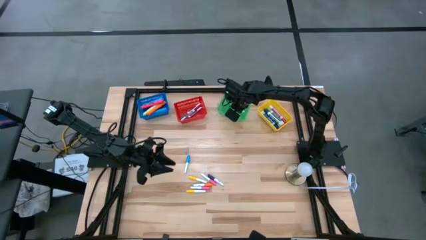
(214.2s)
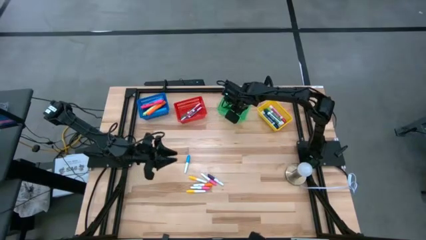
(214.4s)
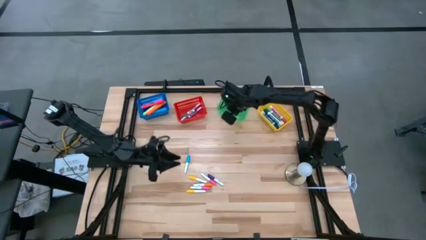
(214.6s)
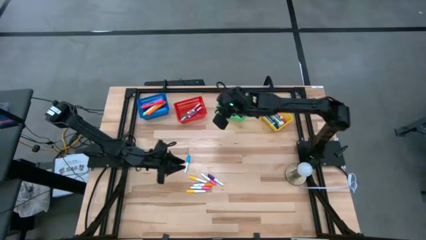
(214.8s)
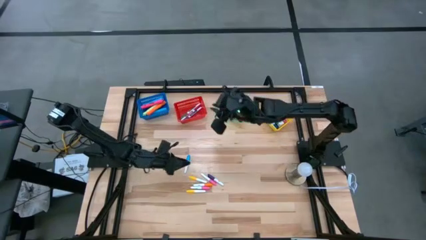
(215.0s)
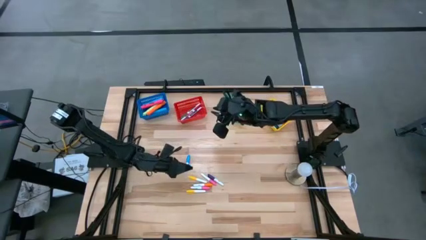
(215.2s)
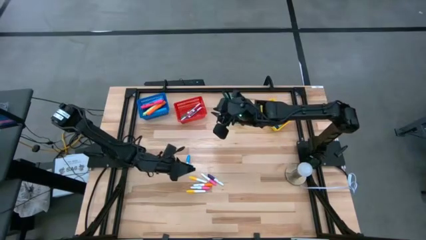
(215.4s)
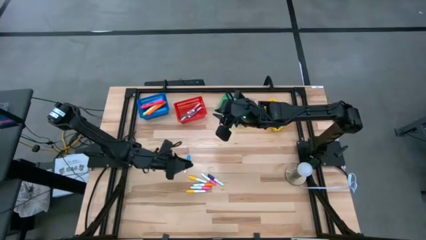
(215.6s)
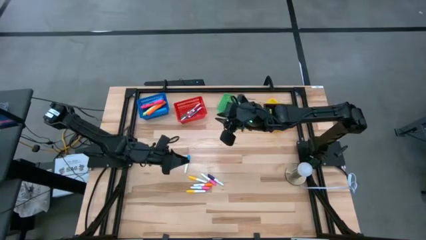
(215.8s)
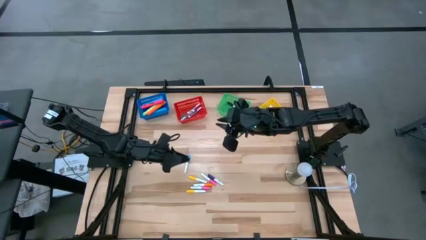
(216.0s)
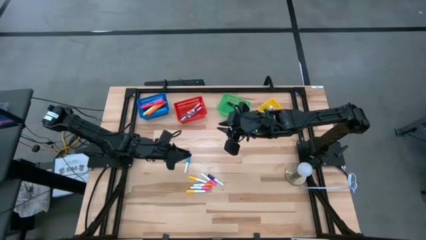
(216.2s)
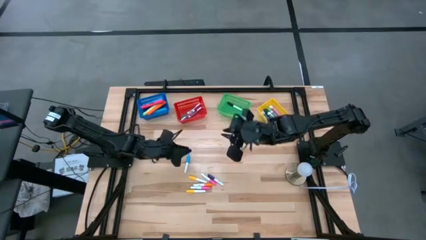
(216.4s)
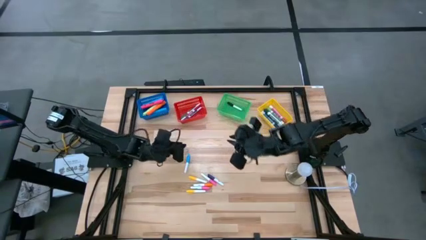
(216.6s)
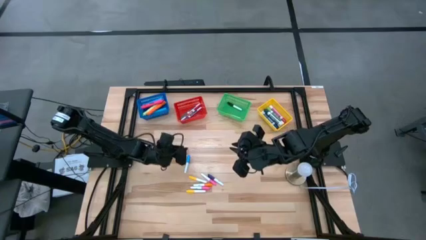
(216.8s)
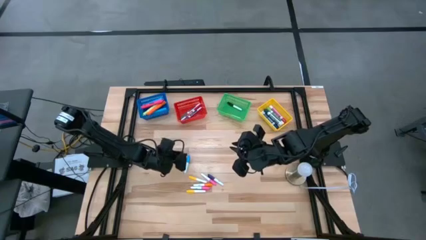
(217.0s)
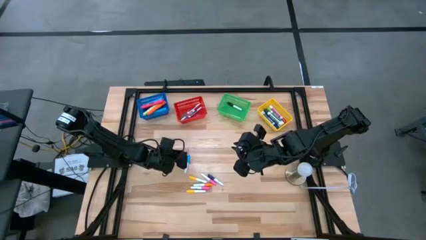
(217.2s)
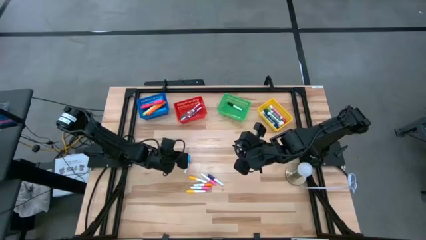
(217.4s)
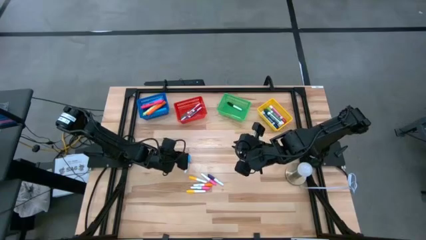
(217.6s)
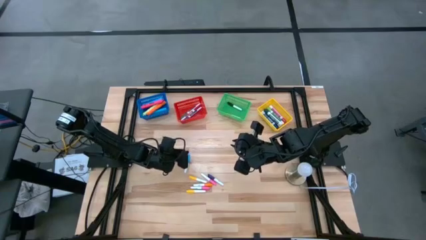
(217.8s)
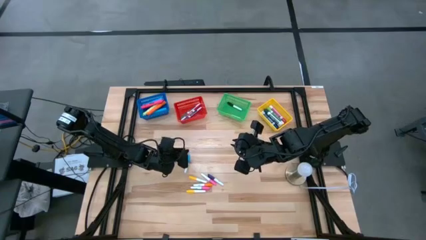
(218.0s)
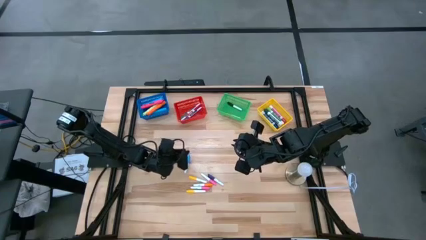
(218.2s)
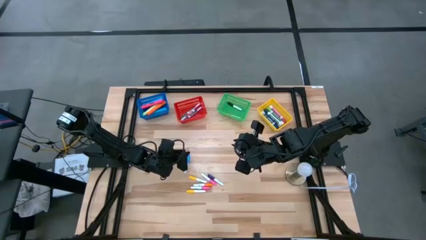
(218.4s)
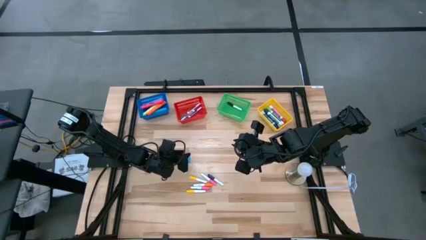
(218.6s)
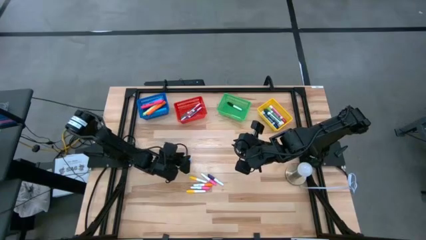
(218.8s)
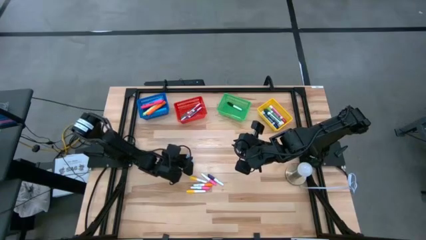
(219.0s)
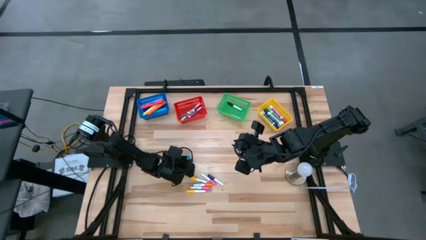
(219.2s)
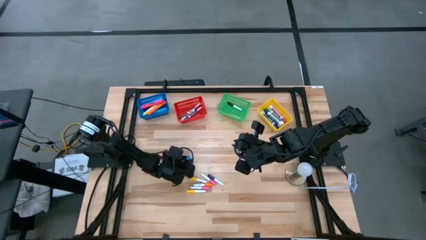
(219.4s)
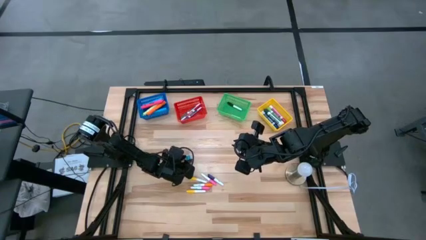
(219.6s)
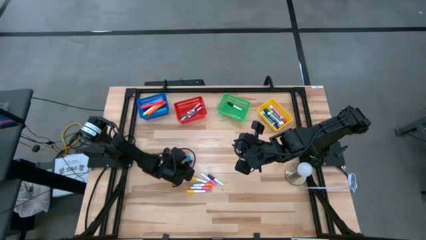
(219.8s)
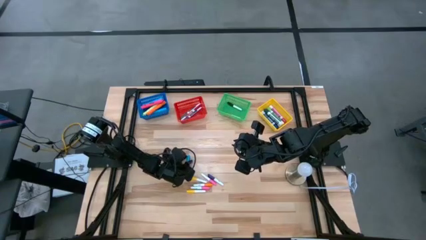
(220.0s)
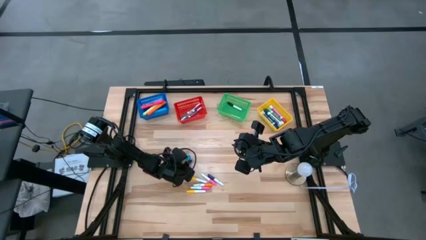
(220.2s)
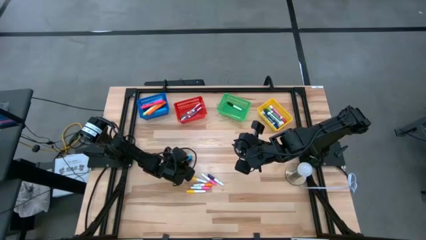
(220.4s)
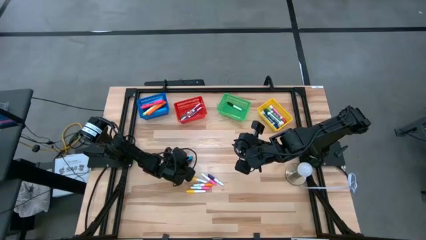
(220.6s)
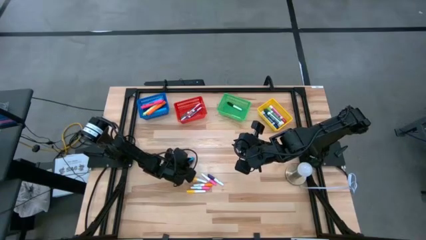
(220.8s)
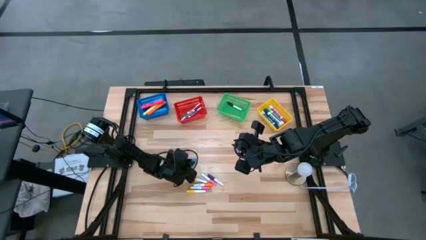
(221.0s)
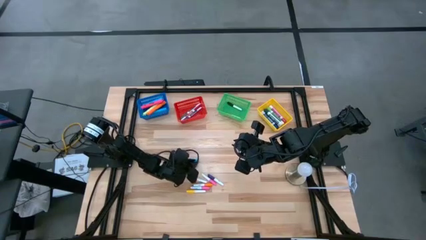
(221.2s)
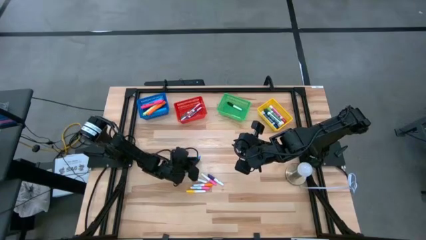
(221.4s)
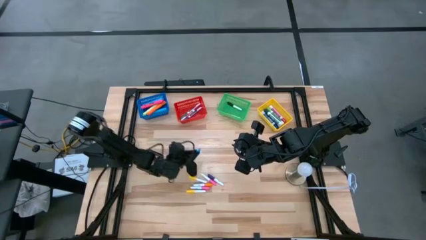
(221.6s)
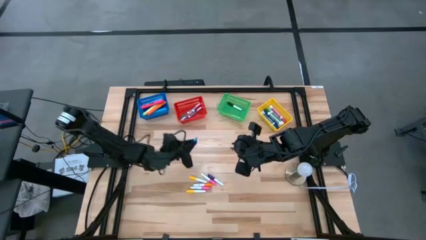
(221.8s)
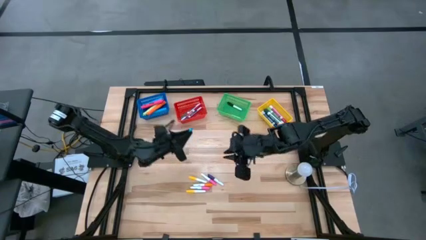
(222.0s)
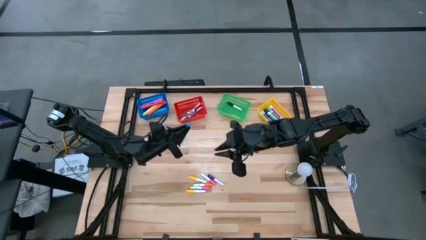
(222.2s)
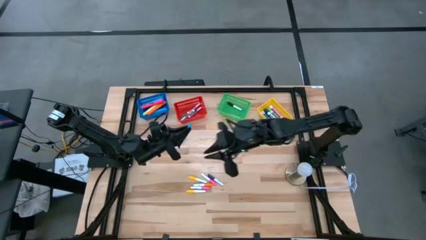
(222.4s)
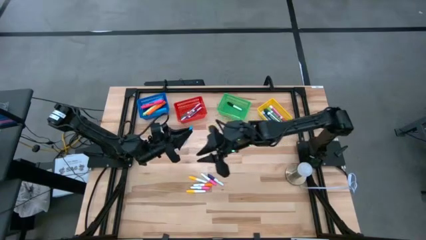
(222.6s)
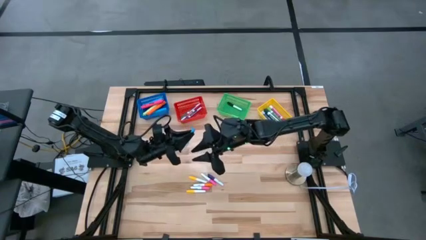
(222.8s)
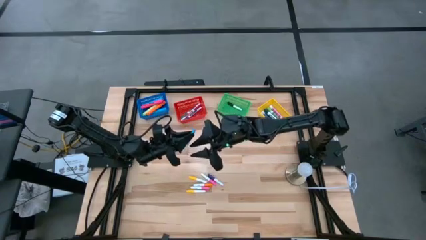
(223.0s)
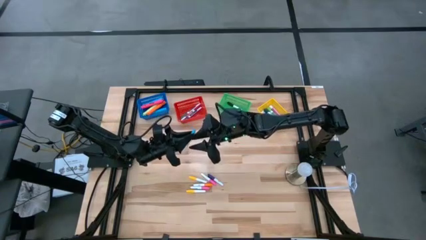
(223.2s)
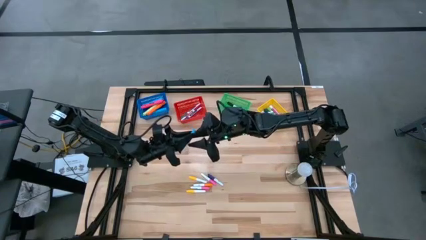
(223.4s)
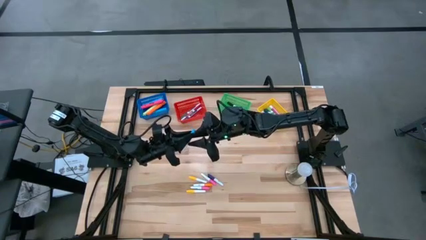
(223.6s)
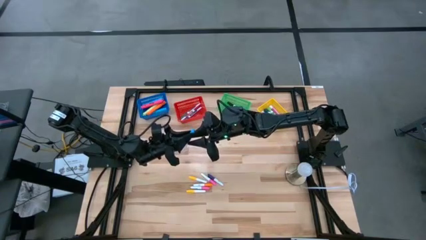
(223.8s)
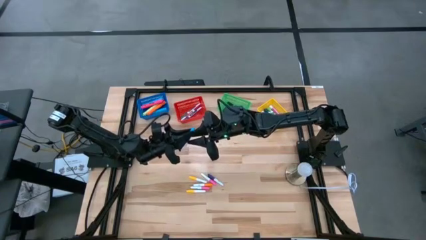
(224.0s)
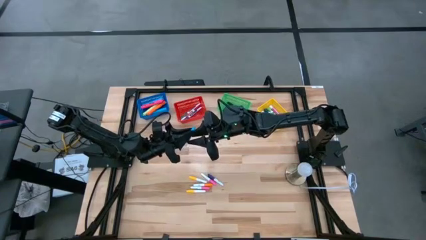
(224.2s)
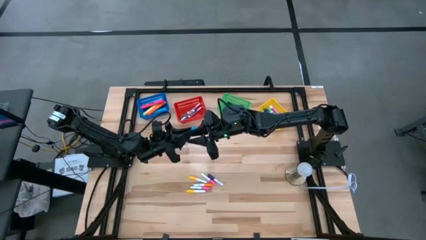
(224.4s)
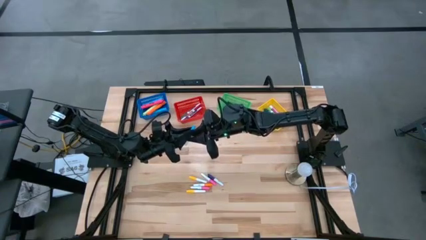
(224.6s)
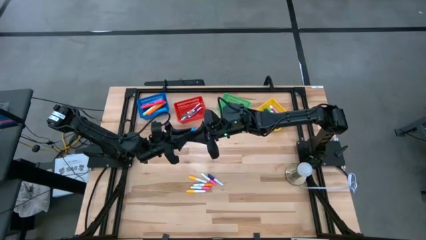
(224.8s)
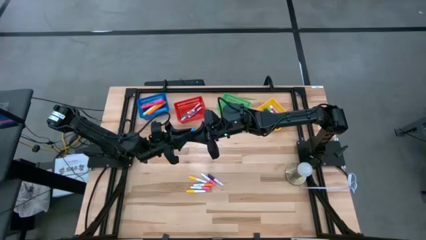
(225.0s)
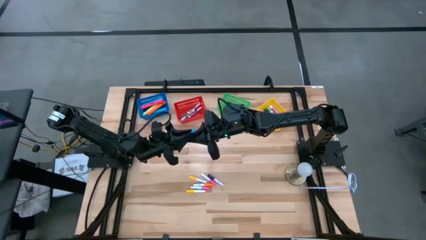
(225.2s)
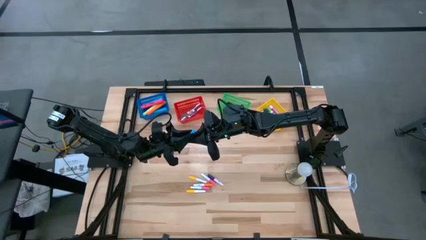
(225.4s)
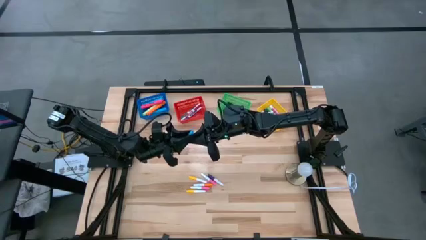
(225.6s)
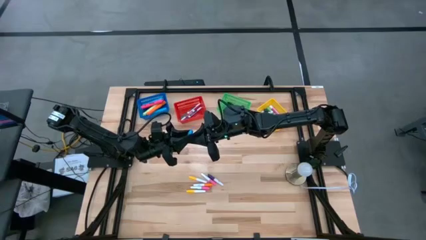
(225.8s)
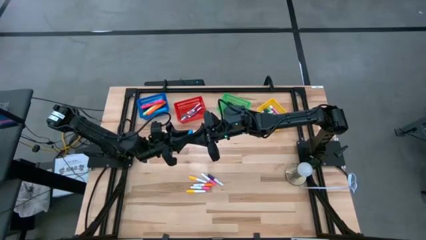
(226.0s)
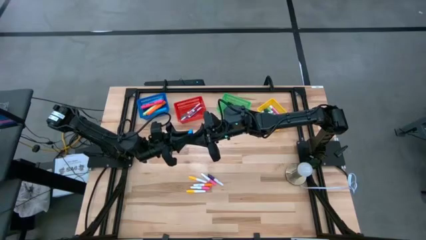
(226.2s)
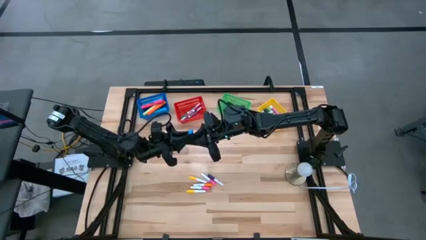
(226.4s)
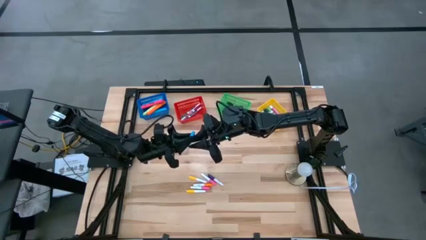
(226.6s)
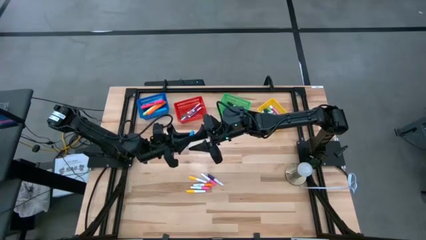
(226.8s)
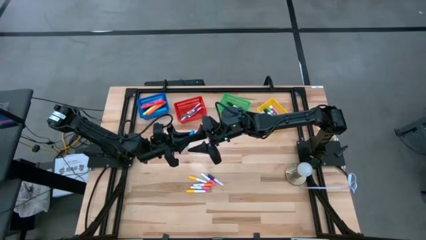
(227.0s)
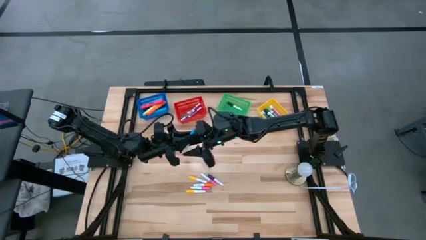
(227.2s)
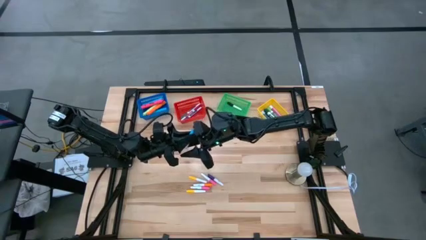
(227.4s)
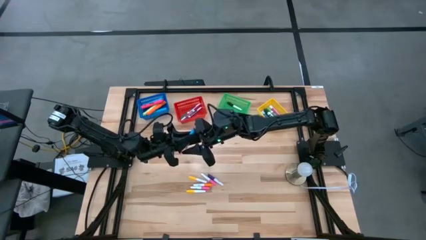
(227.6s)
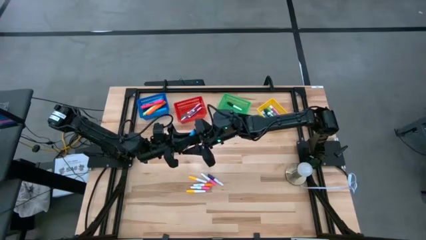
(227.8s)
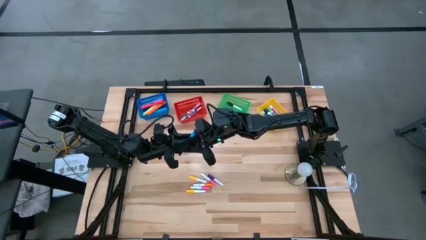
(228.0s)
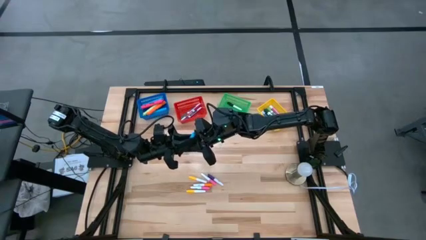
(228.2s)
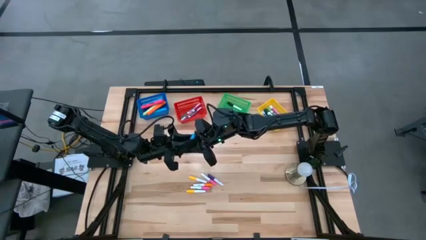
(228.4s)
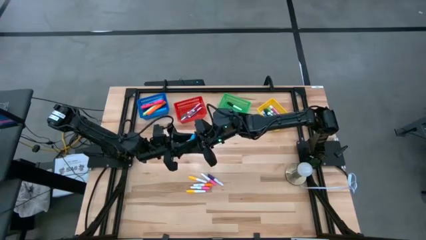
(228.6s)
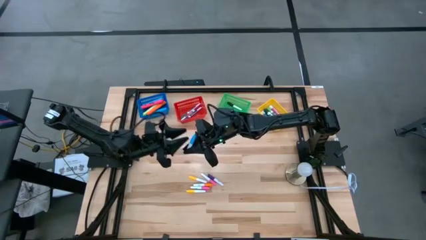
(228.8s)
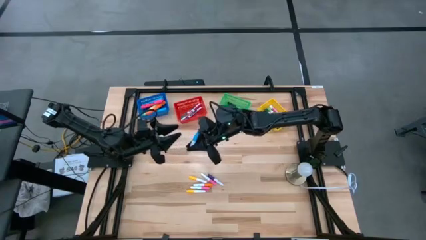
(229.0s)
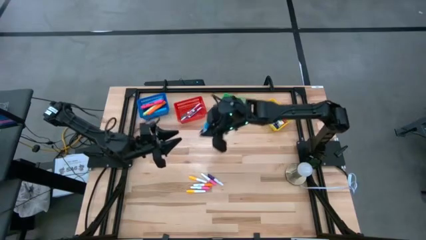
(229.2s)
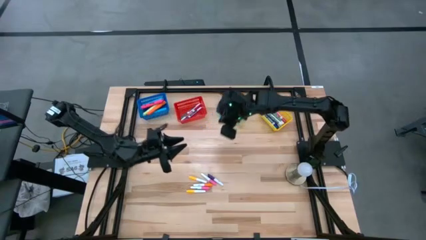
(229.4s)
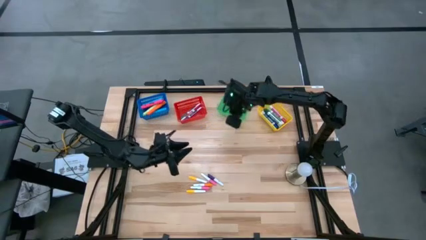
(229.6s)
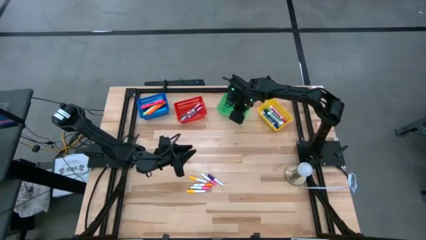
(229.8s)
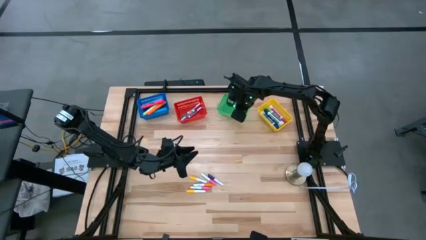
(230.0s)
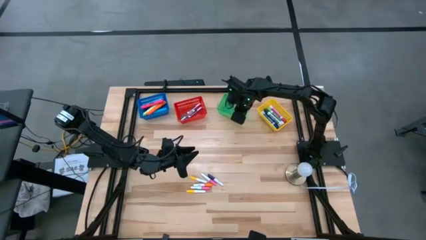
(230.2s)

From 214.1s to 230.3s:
Task: Pick & Place Markers
Put the small blue highlighter pen into the green bin
